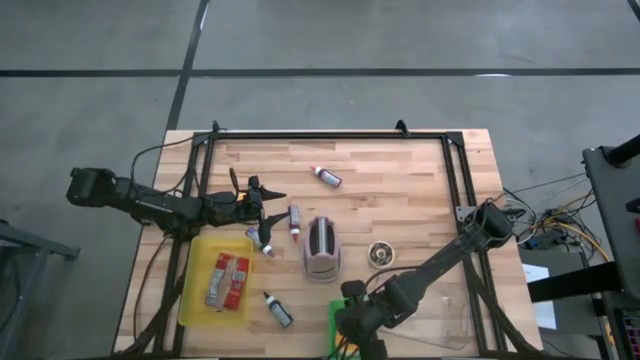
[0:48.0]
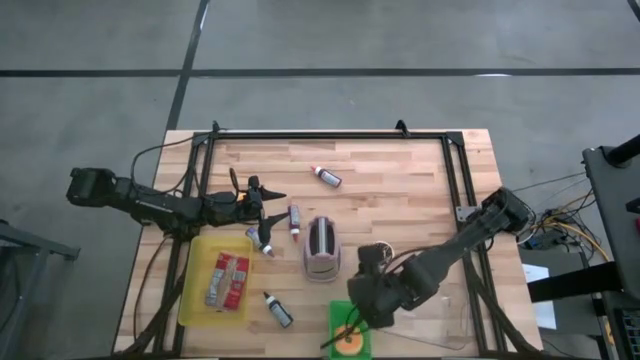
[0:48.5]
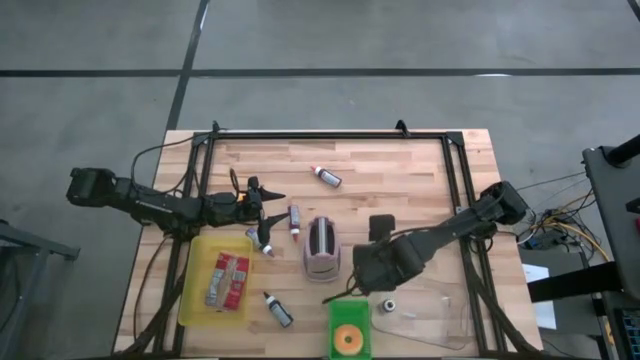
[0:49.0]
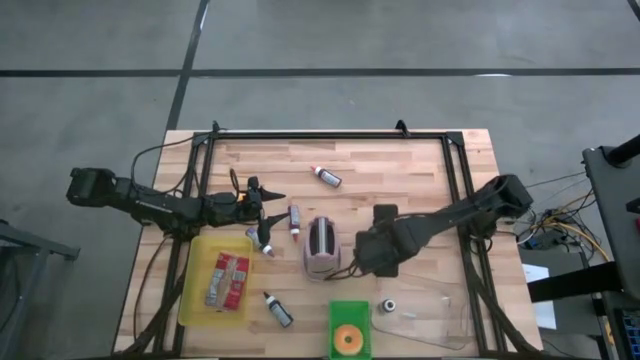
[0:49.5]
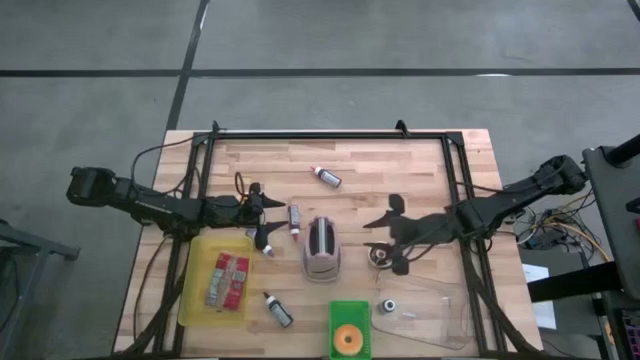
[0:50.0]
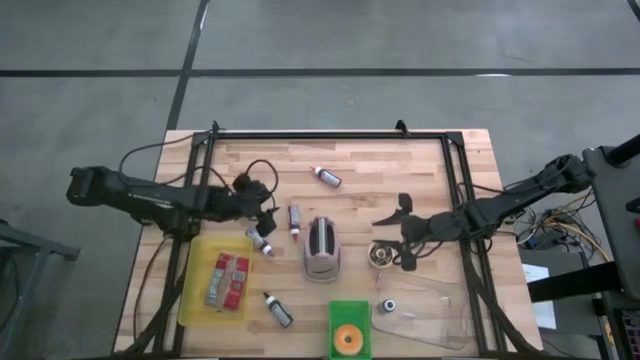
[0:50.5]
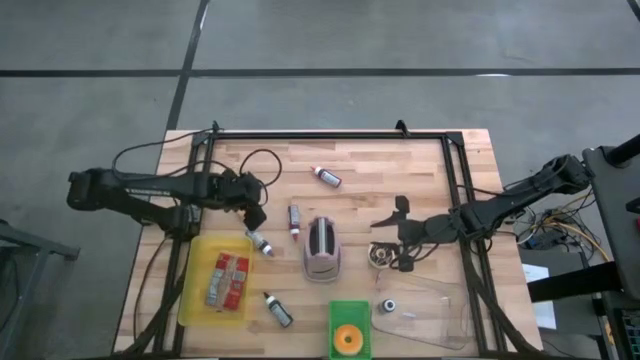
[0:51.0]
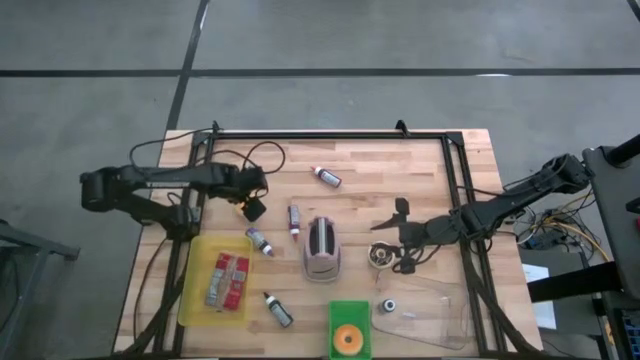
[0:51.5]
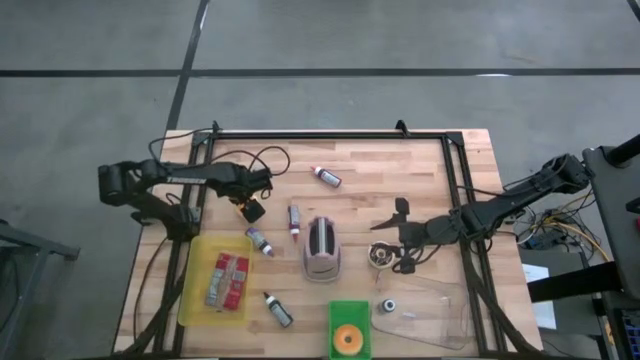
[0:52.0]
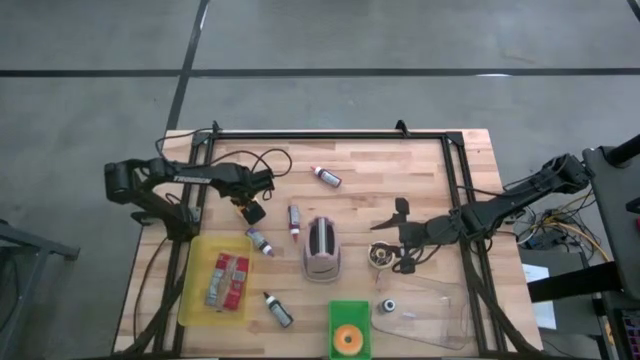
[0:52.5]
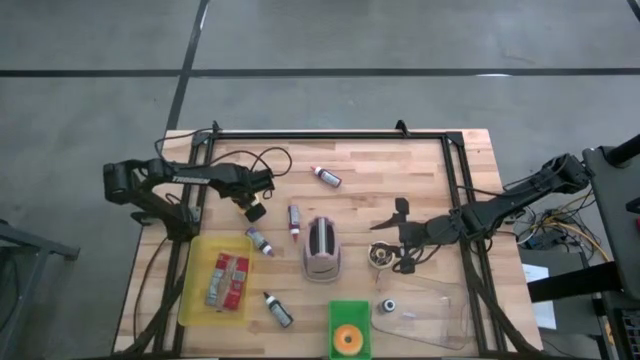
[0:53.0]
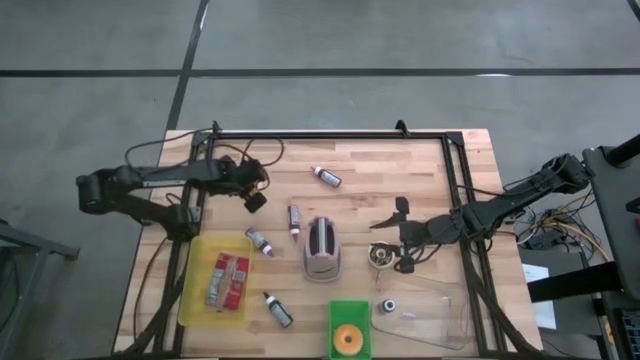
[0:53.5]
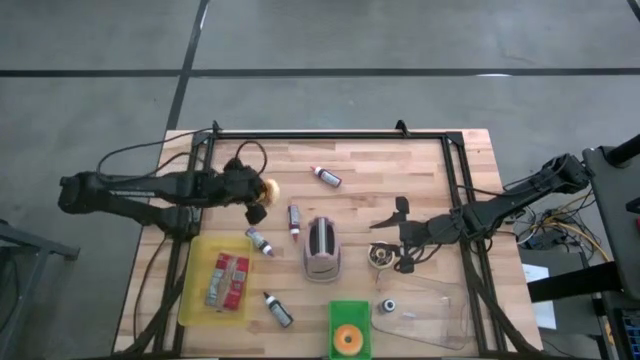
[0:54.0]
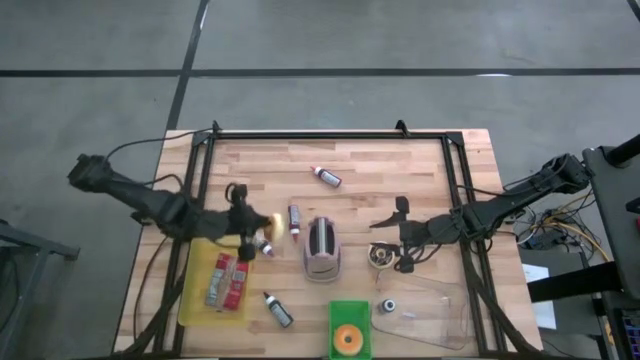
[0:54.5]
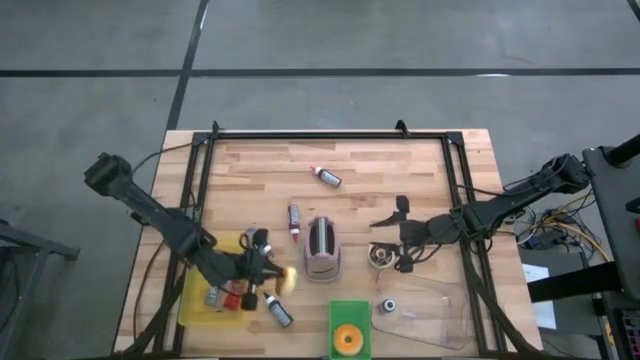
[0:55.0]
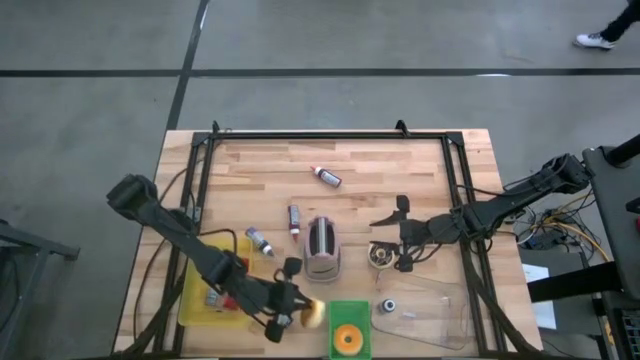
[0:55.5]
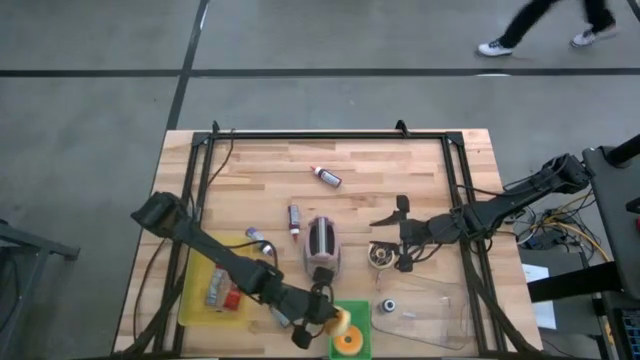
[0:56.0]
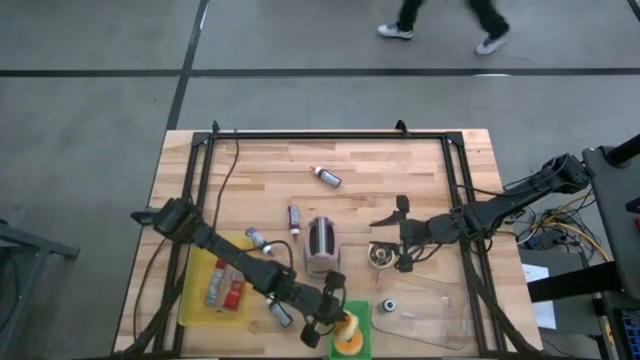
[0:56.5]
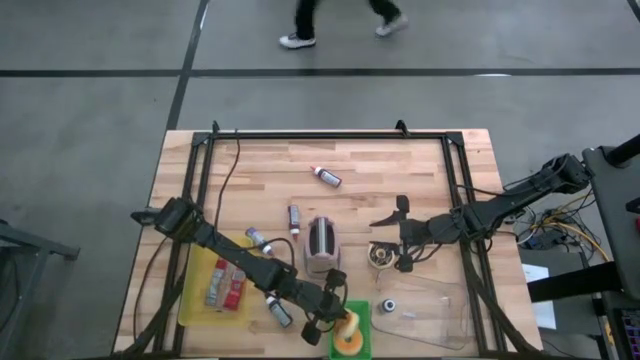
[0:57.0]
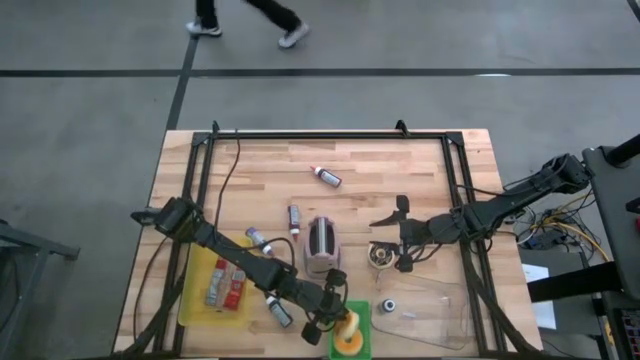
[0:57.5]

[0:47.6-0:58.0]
Task: Pick & Place Food Item
Put the yellow donut into the green bin

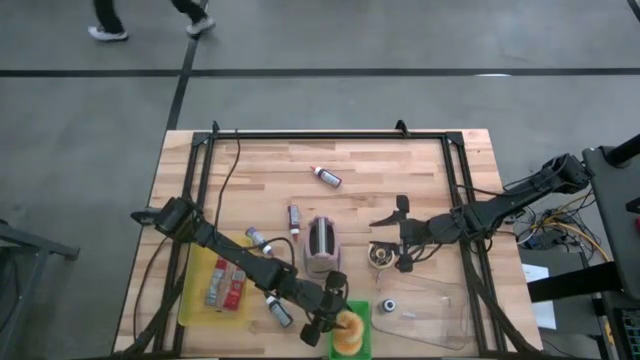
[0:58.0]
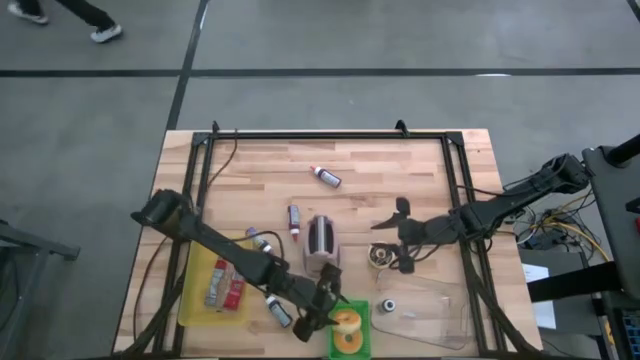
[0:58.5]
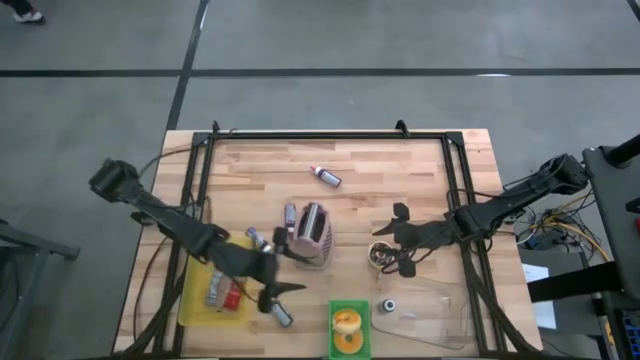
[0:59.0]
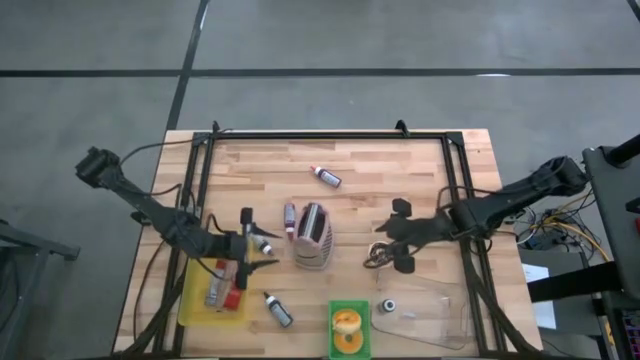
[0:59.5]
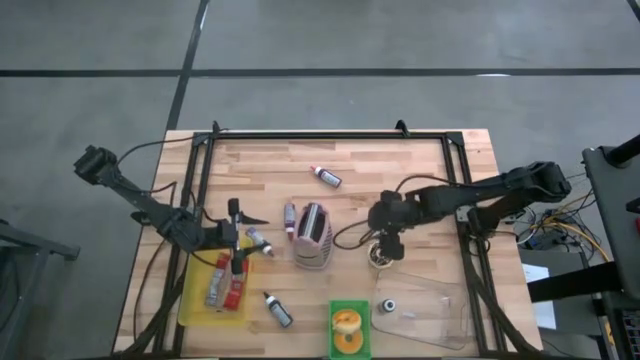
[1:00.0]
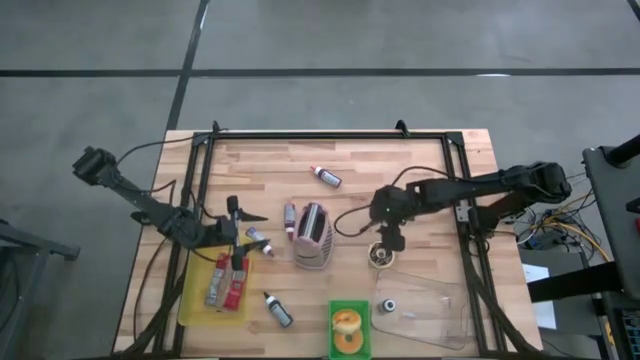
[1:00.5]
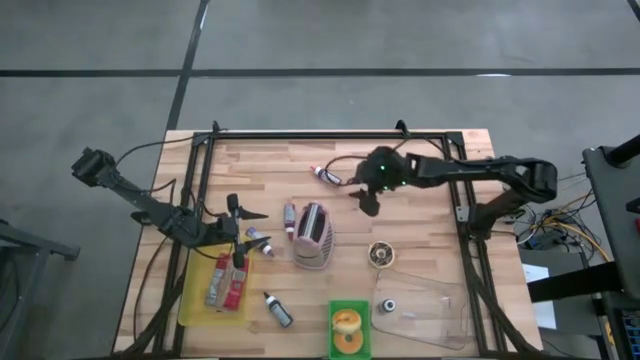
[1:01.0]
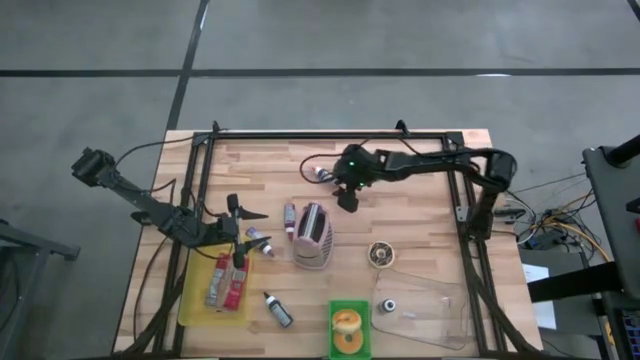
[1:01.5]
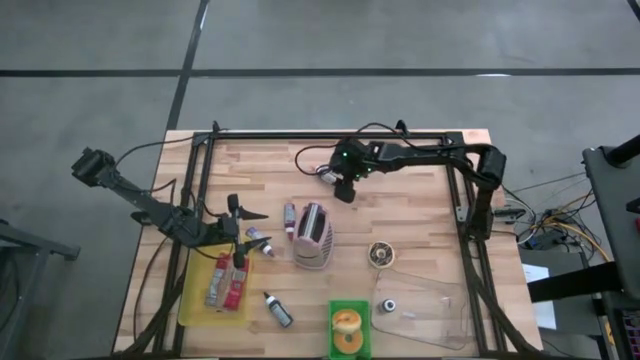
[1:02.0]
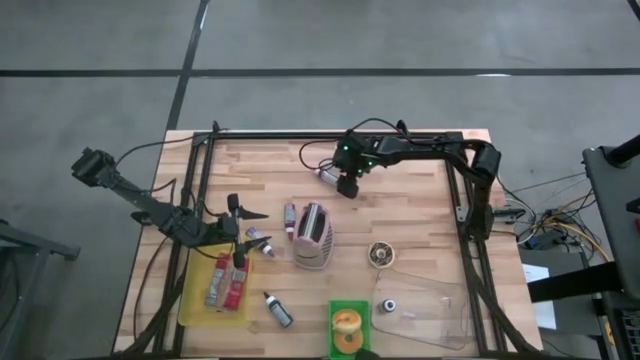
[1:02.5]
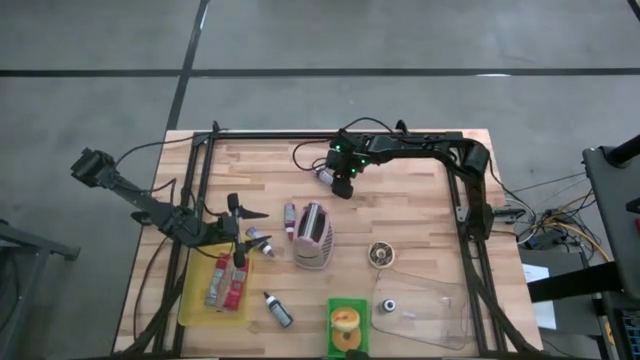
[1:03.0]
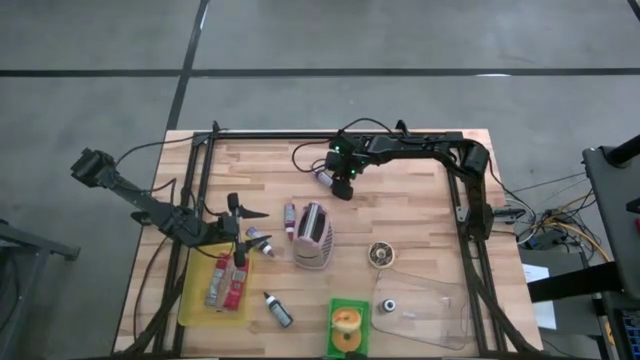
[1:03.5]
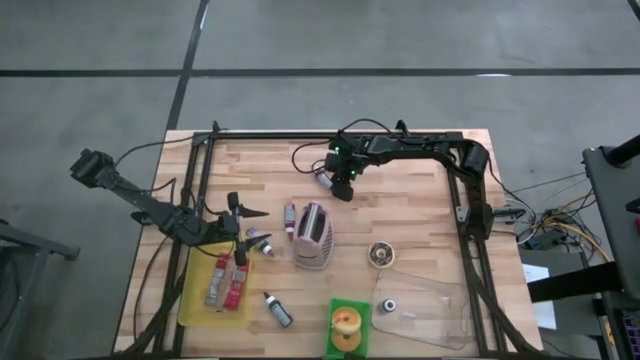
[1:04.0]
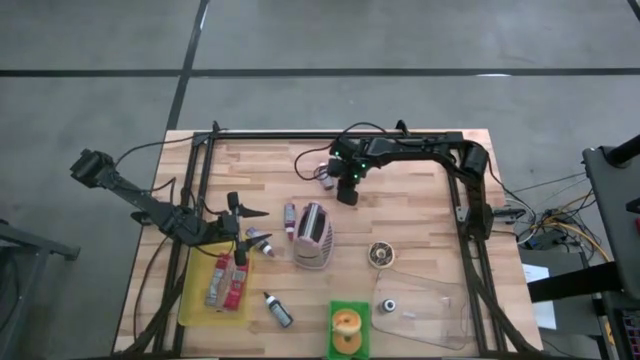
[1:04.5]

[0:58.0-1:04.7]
Put the pink food coloring bottle into the transparent bin

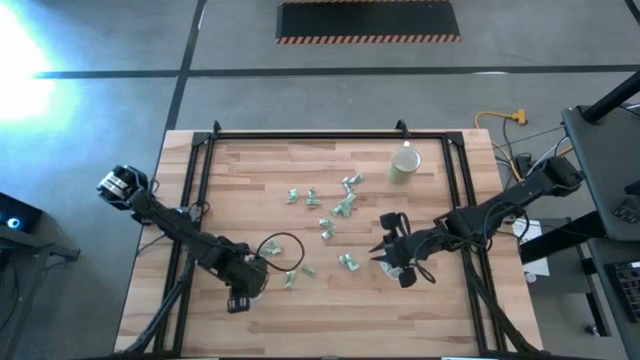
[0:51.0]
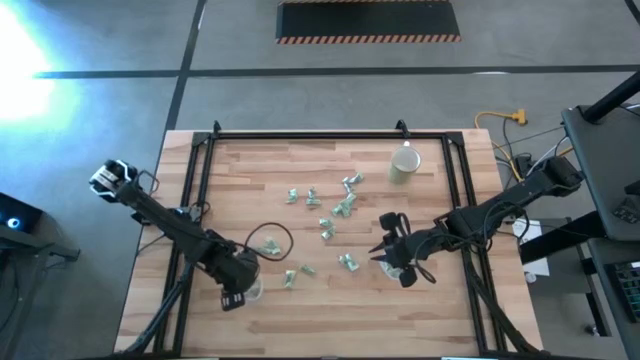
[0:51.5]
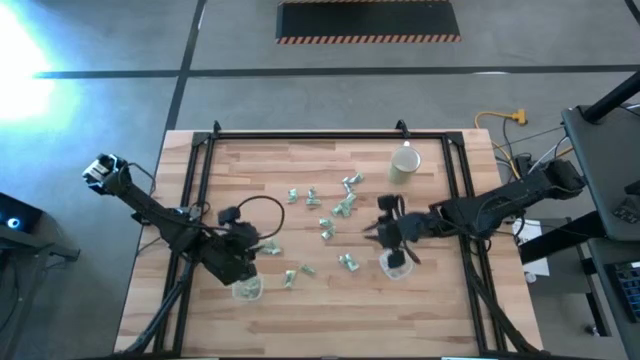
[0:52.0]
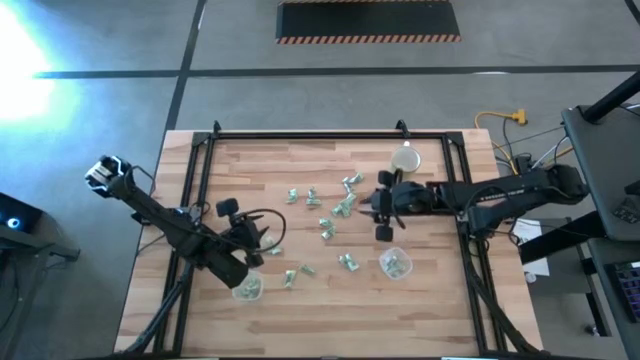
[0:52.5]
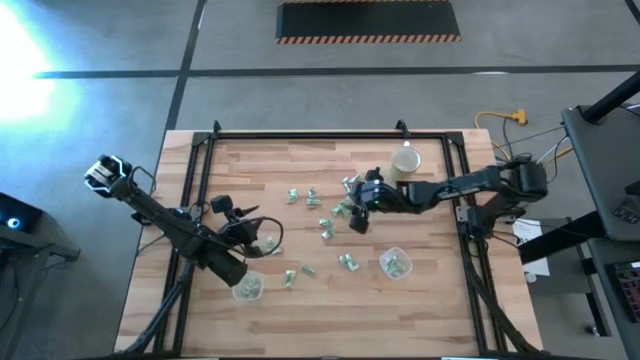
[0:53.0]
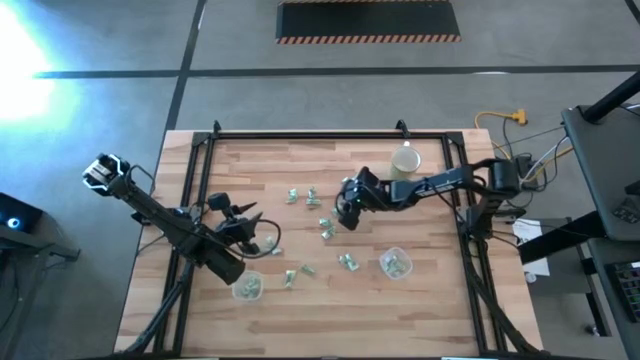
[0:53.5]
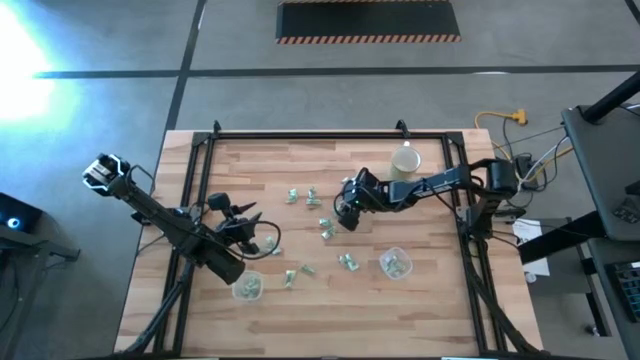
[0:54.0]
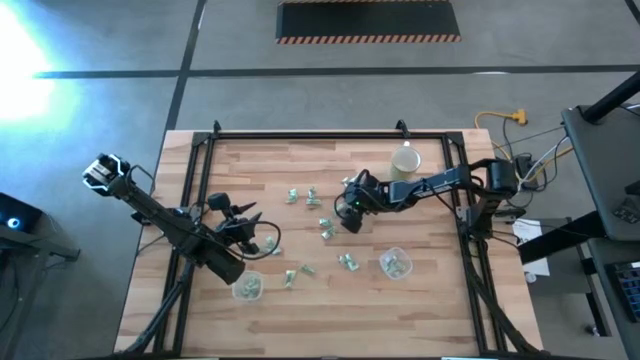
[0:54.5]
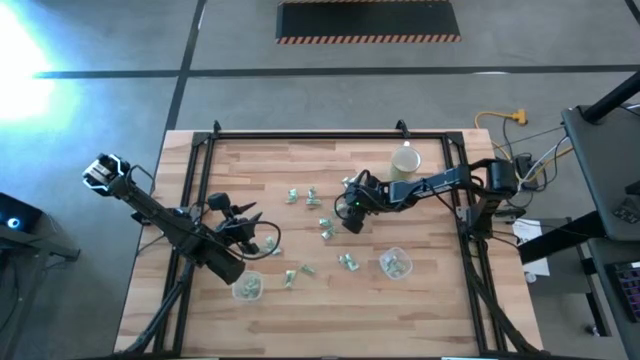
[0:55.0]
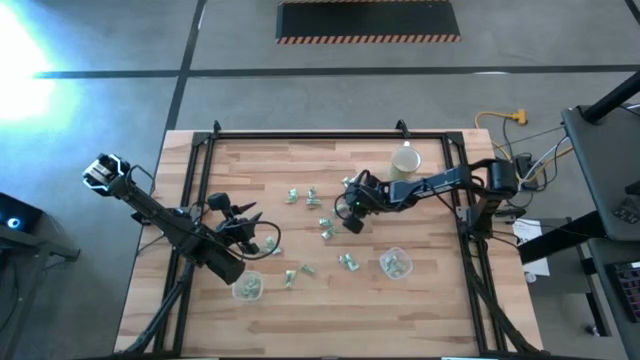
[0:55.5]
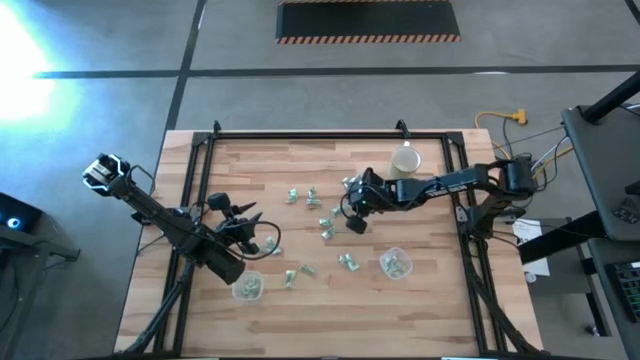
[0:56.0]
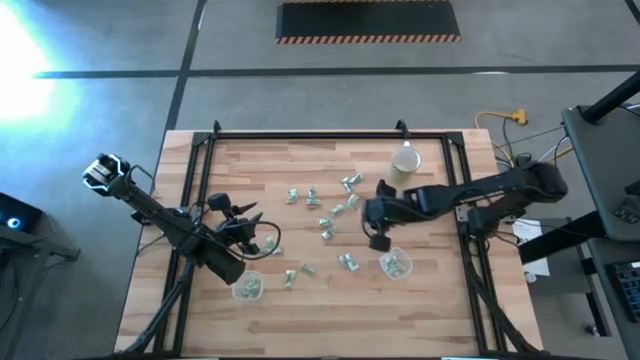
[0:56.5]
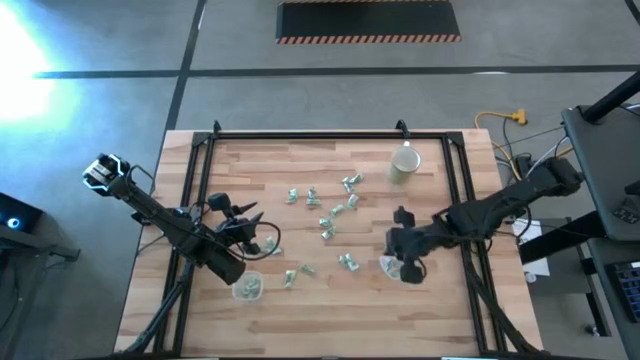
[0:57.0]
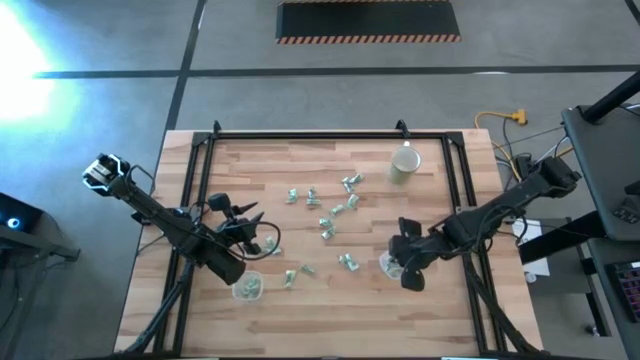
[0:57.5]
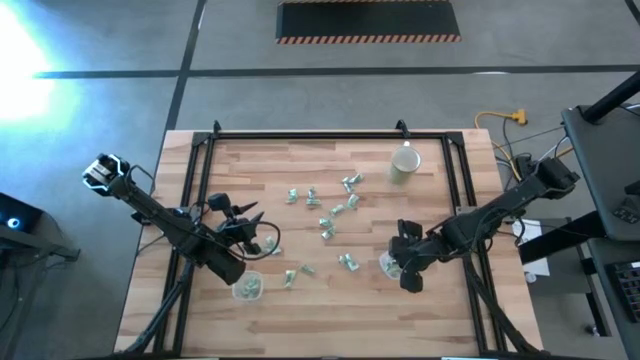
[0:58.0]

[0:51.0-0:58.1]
Task: Pick and place Stevia / Truvia into bins
Put the stevia packet into the right transparent container
